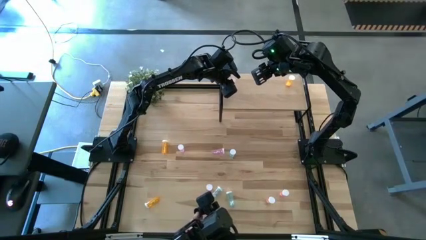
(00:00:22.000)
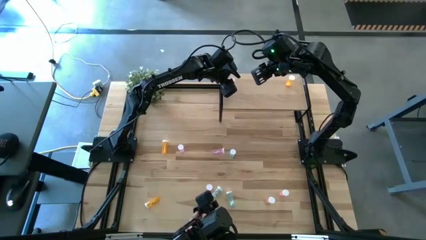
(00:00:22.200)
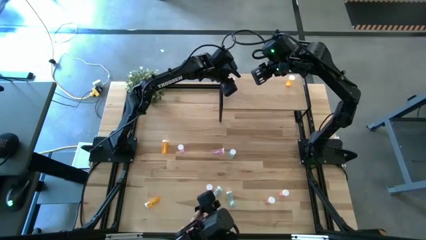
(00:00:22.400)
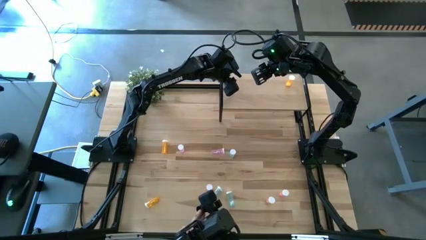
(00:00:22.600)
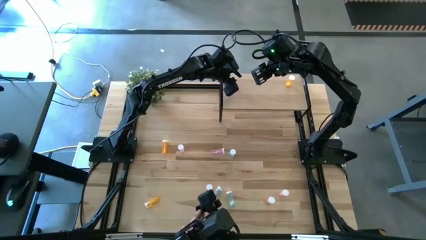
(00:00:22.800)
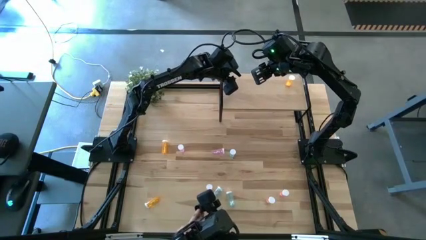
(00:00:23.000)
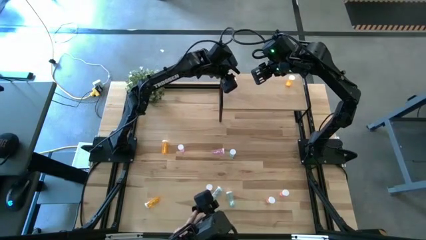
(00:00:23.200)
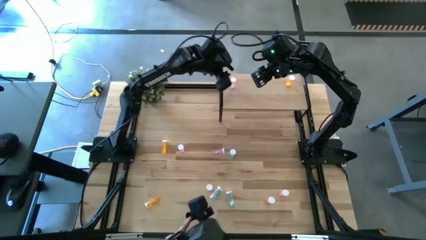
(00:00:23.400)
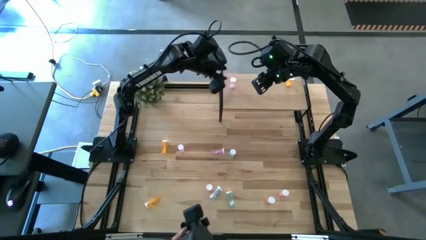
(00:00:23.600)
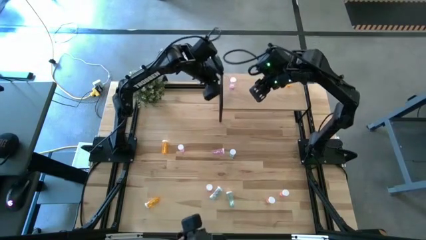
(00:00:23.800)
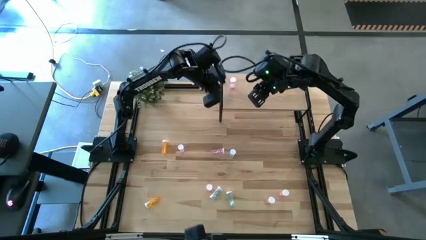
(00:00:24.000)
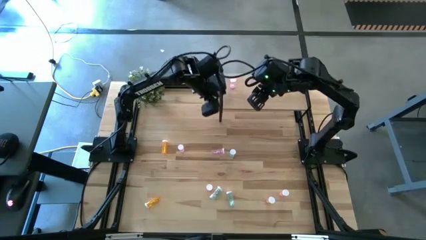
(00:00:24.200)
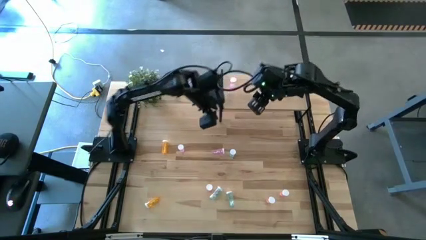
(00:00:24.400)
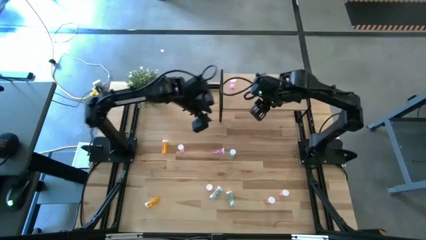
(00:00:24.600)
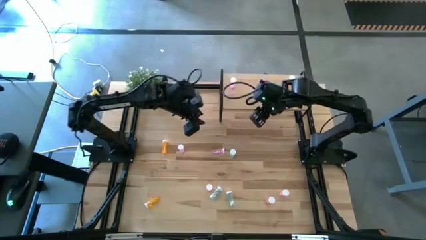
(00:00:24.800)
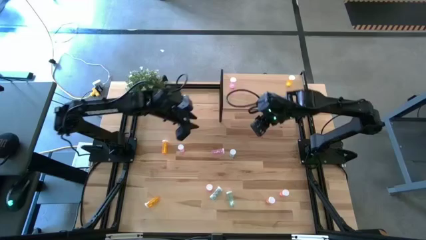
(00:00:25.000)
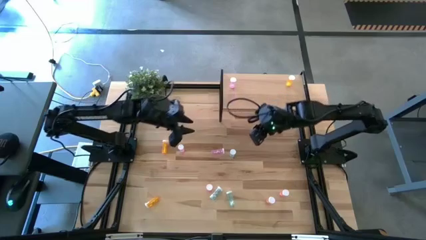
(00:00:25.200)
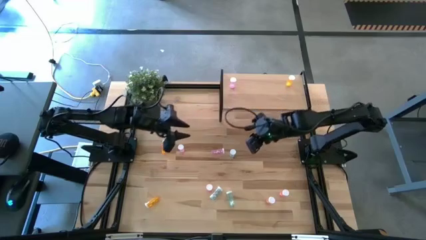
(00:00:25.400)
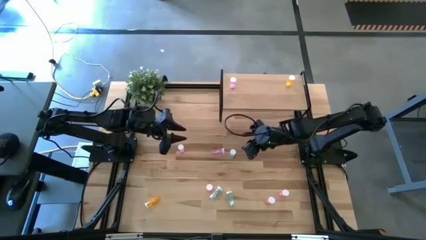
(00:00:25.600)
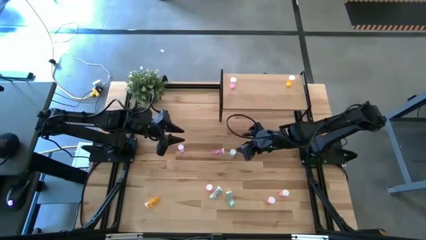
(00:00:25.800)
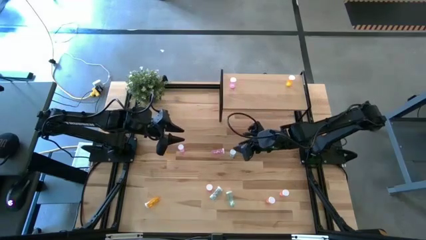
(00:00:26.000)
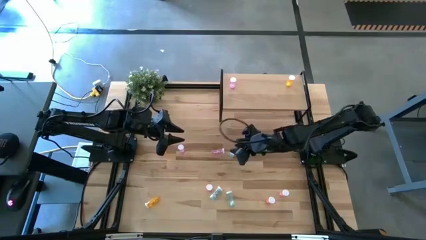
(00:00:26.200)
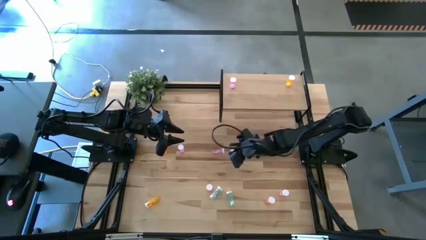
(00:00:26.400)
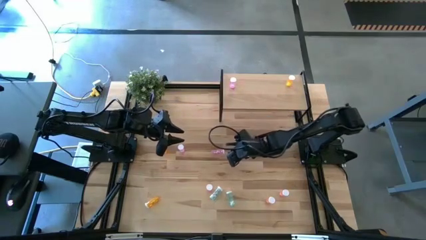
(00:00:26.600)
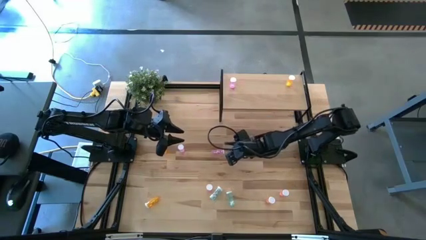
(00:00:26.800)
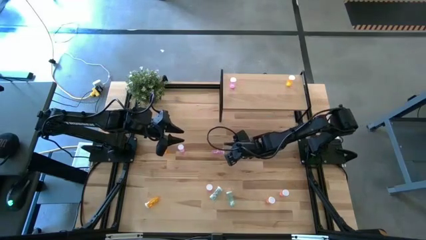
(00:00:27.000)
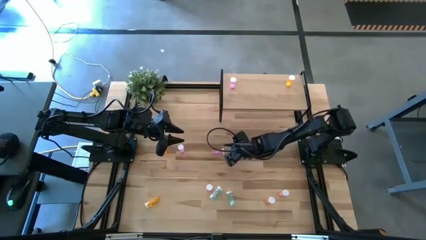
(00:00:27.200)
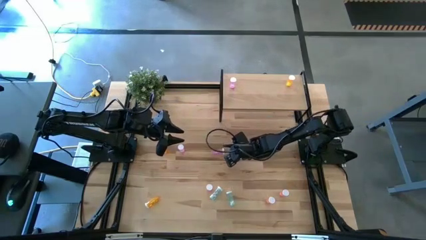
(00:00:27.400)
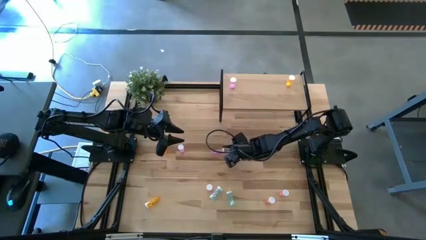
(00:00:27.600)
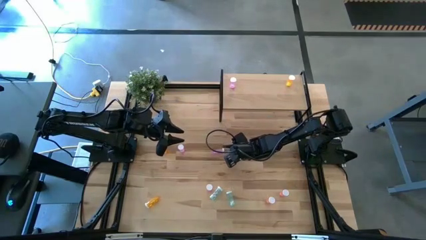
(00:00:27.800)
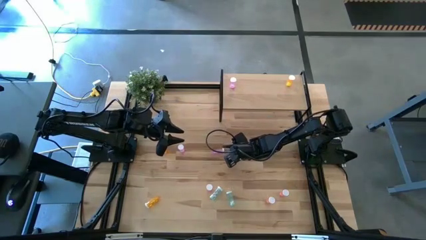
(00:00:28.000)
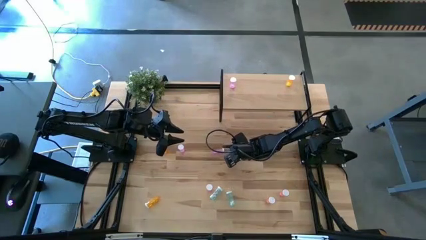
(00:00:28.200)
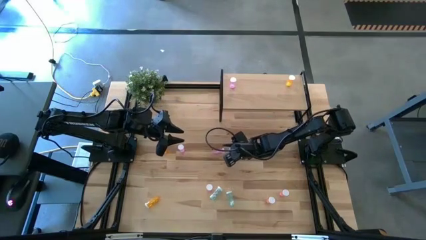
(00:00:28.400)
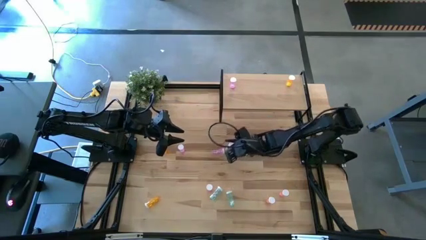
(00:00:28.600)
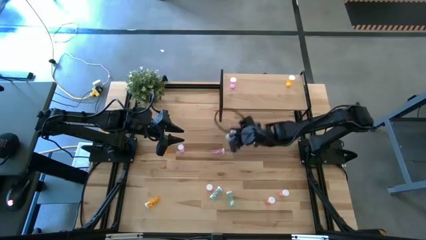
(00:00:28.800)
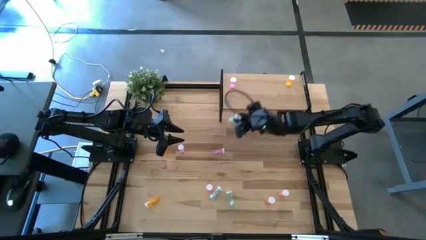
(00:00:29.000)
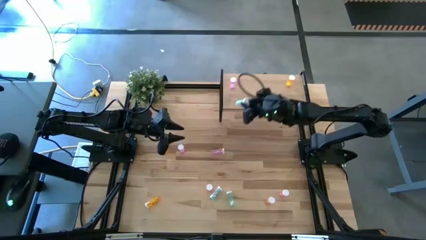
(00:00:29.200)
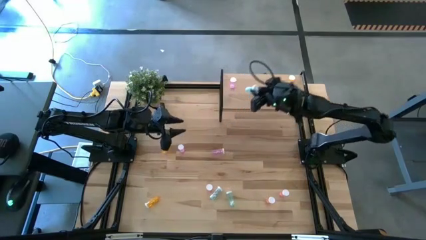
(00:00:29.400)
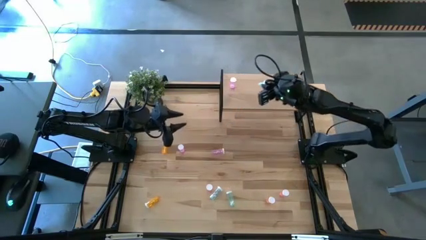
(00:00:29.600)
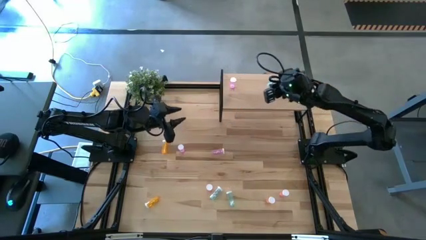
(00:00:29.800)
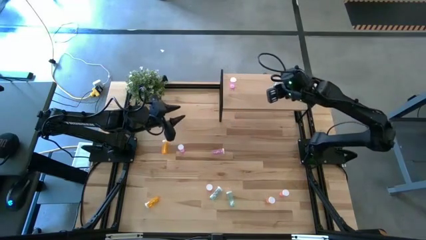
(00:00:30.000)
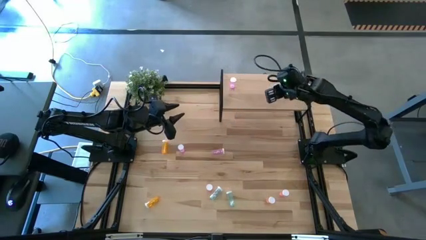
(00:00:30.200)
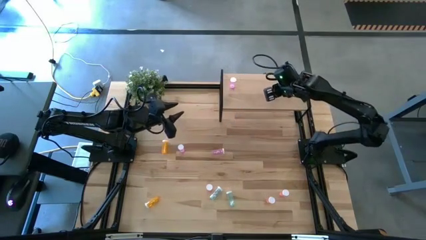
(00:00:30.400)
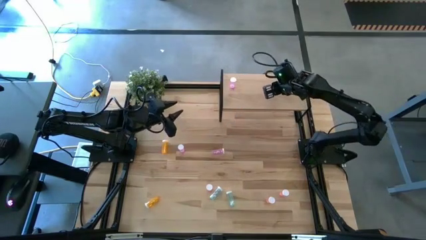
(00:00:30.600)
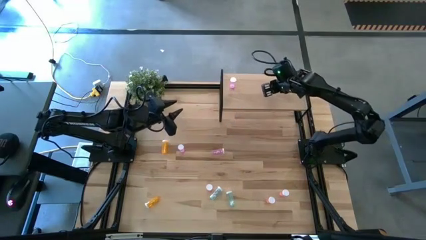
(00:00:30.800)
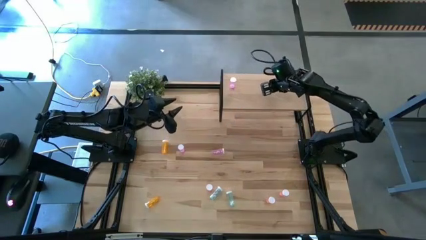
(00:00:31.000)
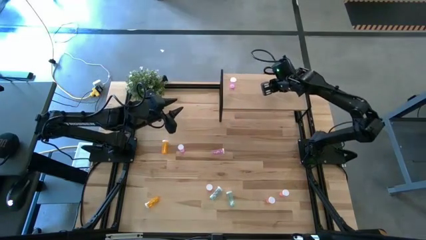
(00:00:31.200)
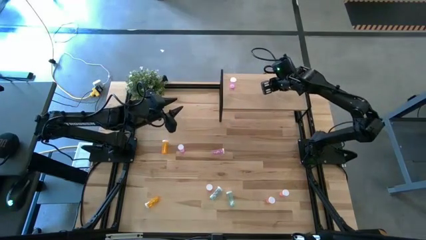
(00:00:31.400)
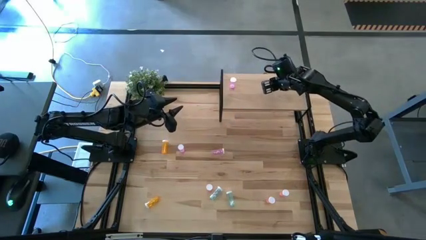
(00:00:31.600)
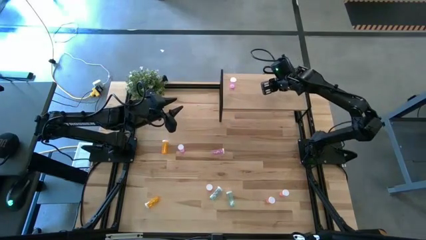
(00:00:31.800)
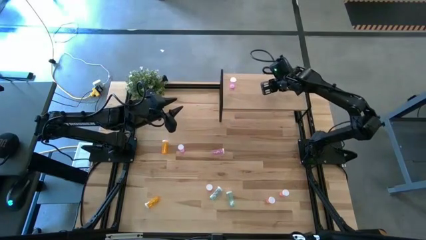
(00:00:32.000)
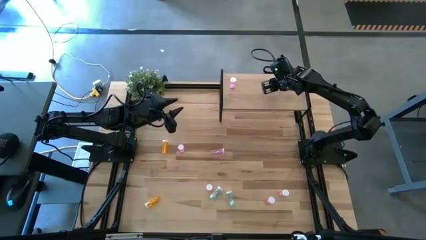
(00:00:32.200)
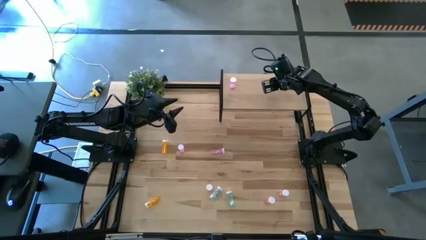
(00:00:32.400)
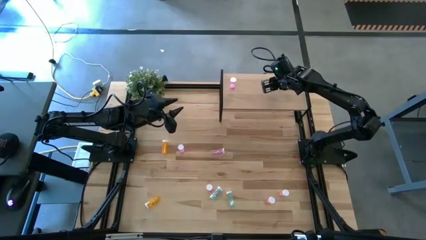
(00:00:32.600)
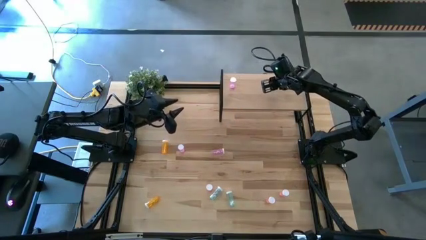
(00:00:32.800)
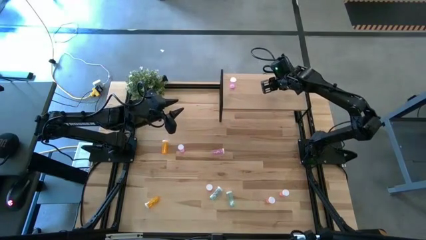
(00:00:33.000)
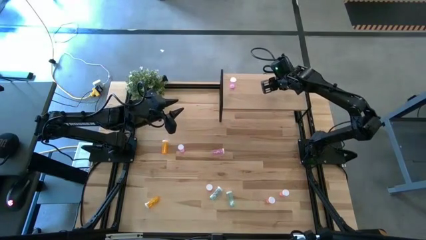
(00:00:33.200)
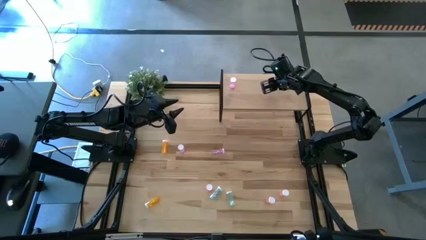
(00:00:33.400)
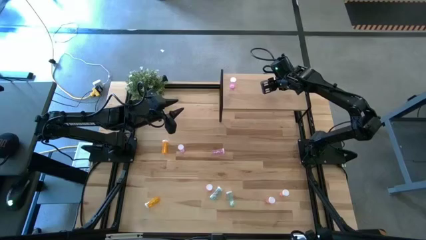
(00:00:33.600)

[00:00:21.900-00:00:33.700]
Task: Pick and place medicine bottles onto shelf by color
Put the top blue pill bottle on the shelf
